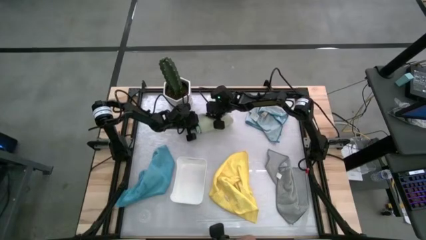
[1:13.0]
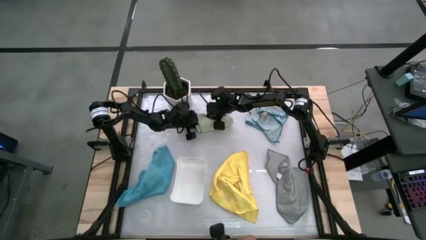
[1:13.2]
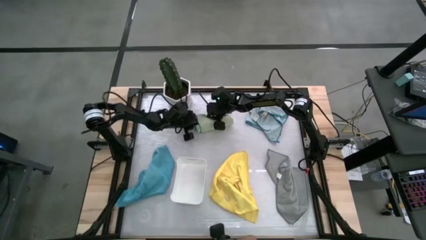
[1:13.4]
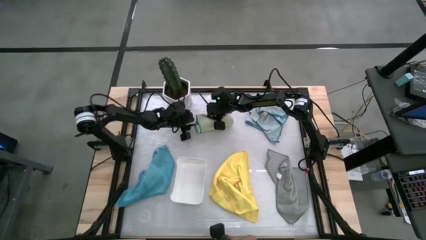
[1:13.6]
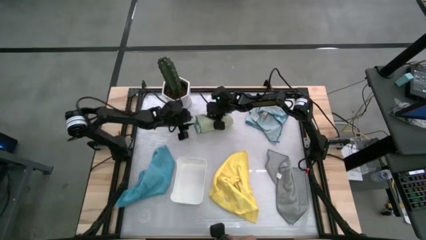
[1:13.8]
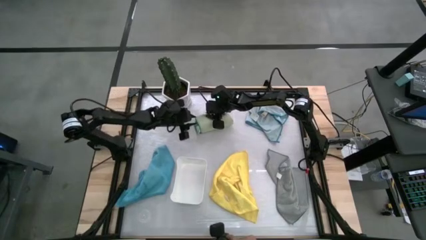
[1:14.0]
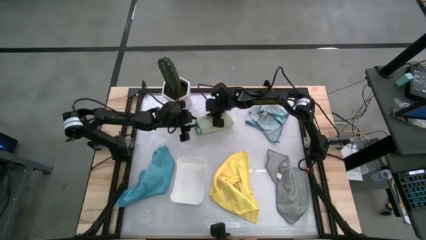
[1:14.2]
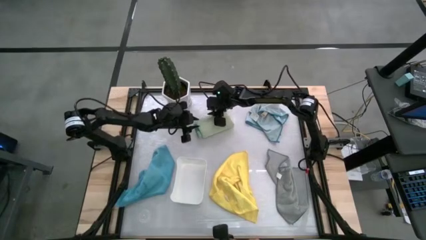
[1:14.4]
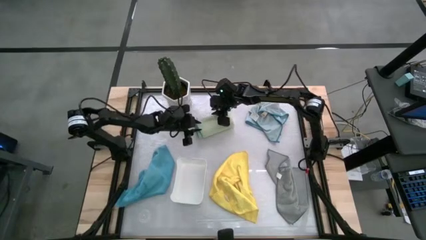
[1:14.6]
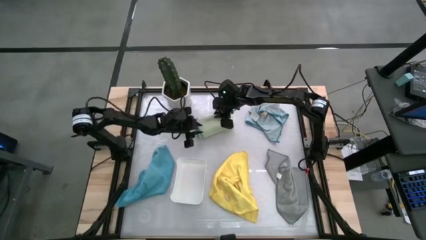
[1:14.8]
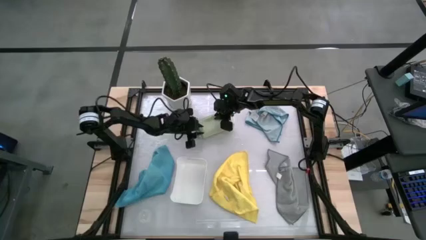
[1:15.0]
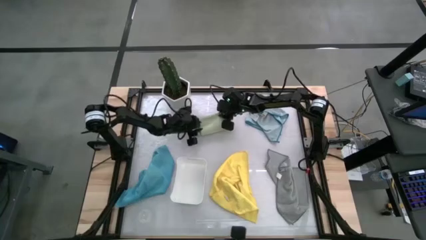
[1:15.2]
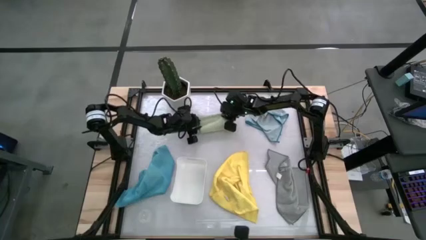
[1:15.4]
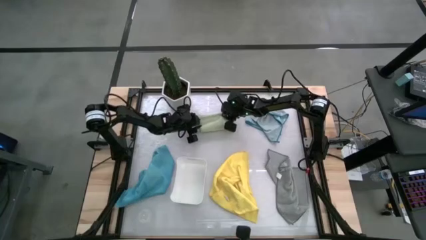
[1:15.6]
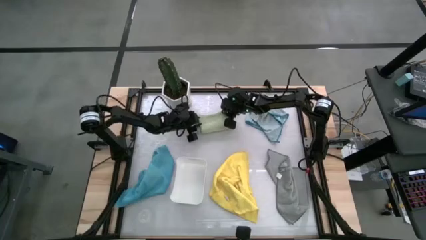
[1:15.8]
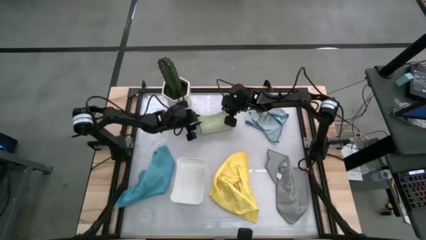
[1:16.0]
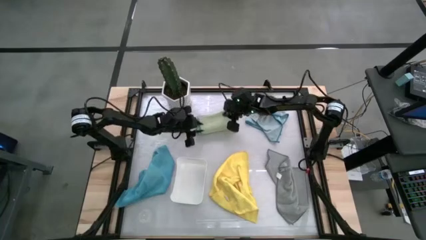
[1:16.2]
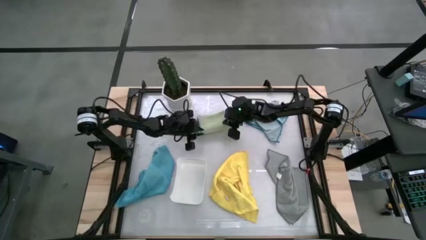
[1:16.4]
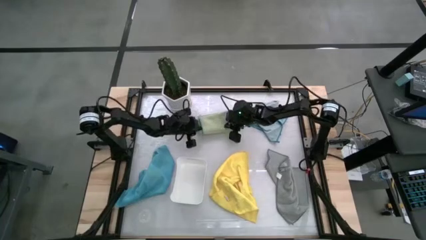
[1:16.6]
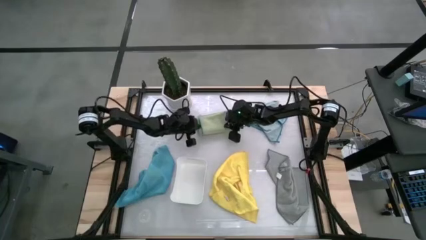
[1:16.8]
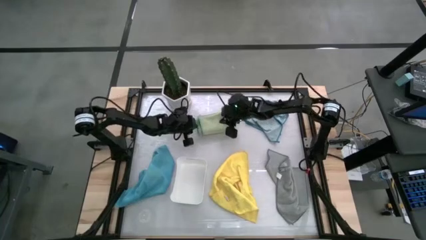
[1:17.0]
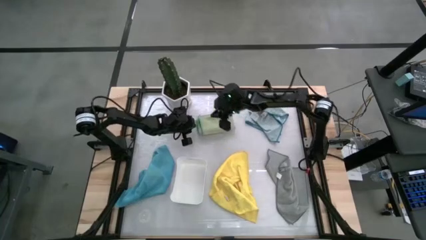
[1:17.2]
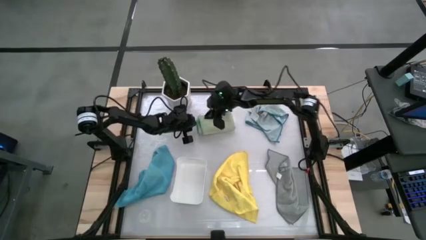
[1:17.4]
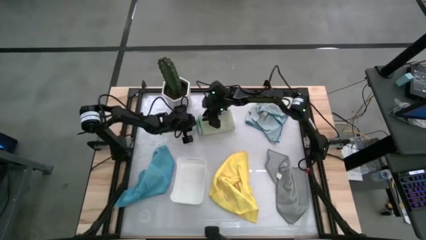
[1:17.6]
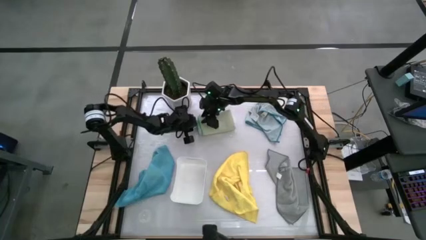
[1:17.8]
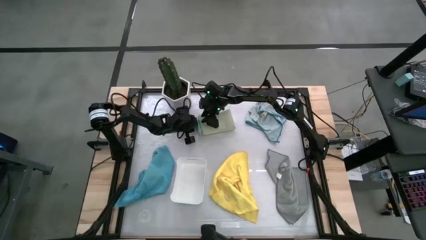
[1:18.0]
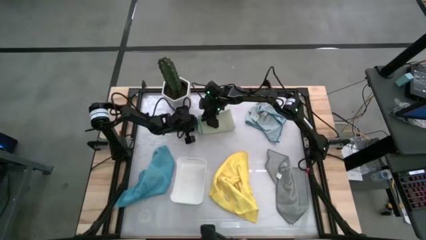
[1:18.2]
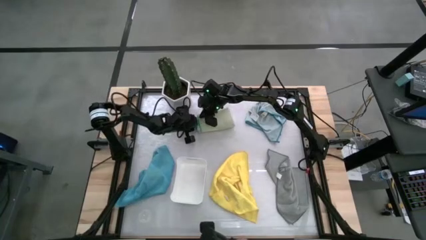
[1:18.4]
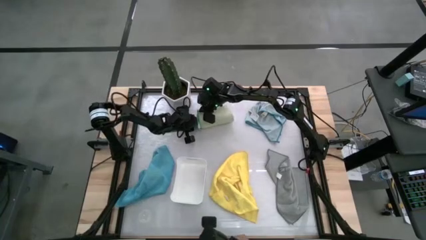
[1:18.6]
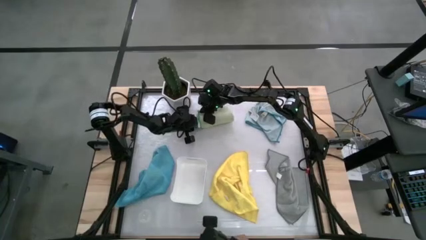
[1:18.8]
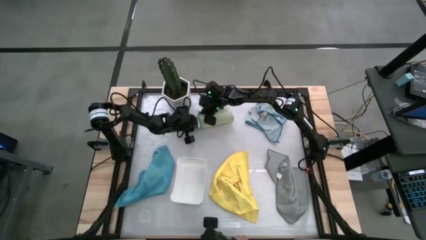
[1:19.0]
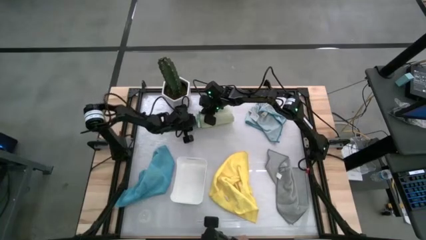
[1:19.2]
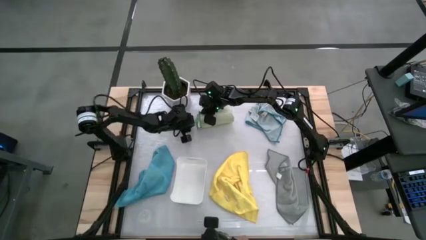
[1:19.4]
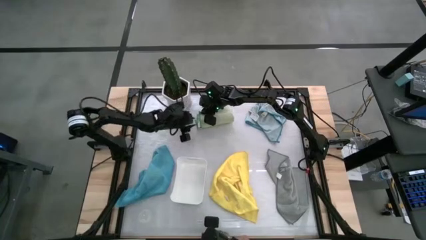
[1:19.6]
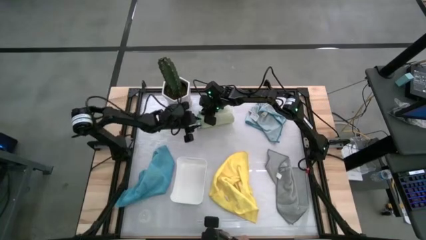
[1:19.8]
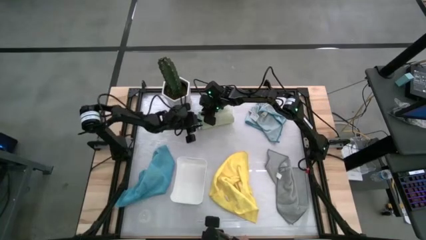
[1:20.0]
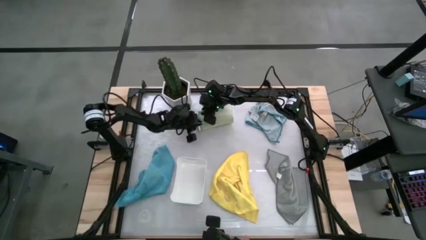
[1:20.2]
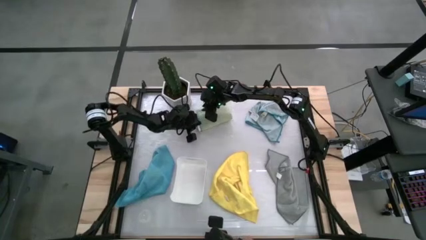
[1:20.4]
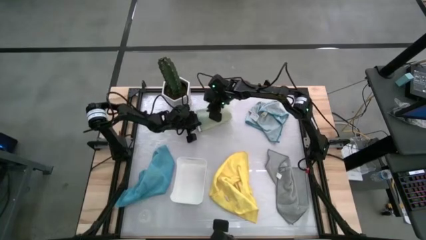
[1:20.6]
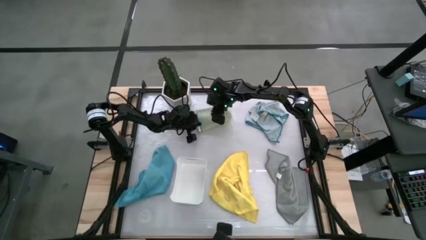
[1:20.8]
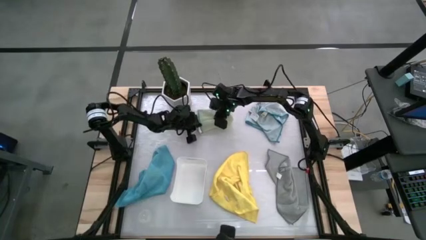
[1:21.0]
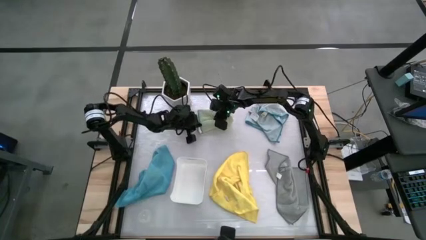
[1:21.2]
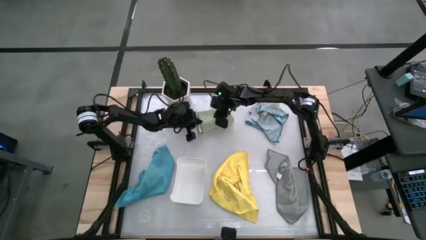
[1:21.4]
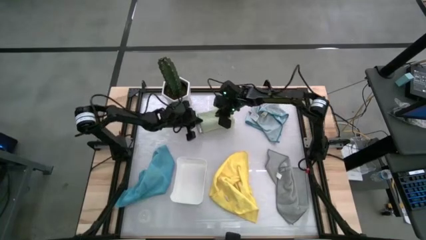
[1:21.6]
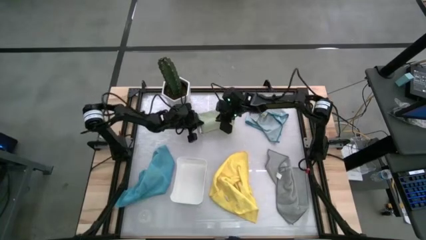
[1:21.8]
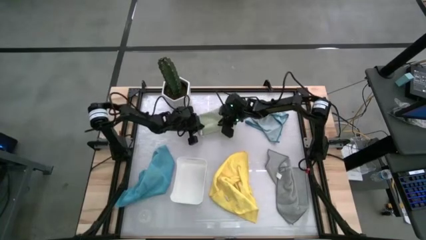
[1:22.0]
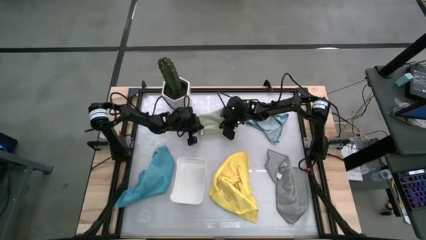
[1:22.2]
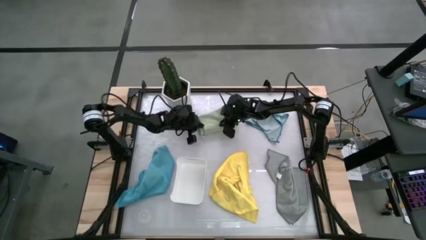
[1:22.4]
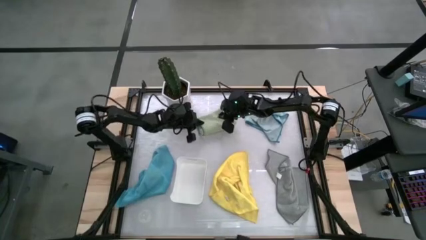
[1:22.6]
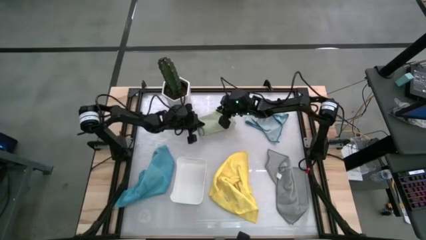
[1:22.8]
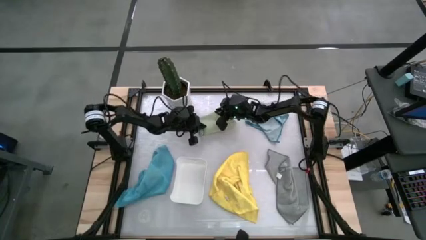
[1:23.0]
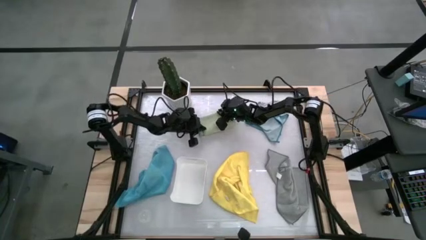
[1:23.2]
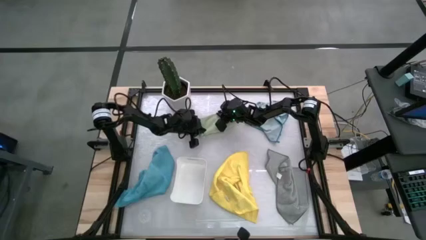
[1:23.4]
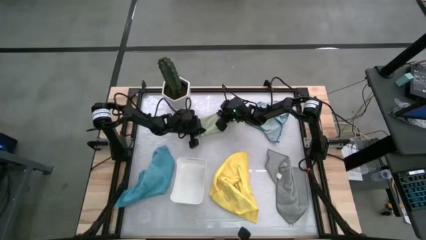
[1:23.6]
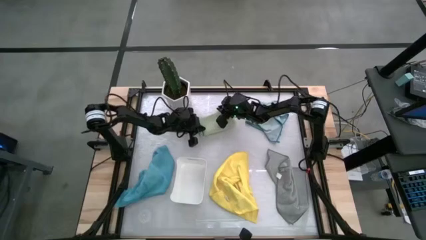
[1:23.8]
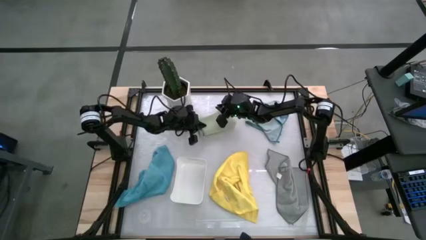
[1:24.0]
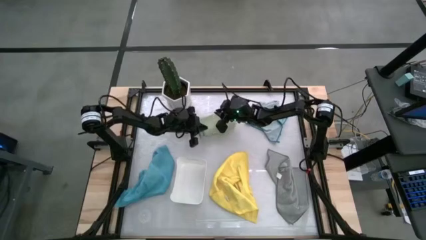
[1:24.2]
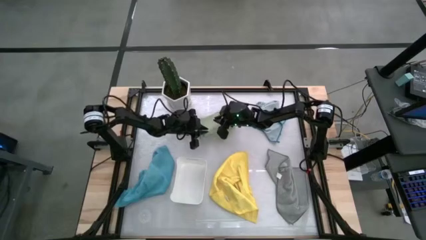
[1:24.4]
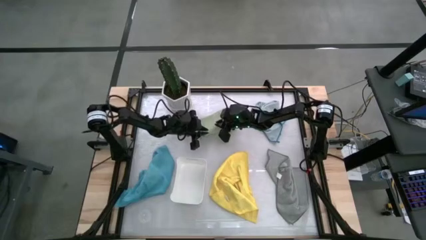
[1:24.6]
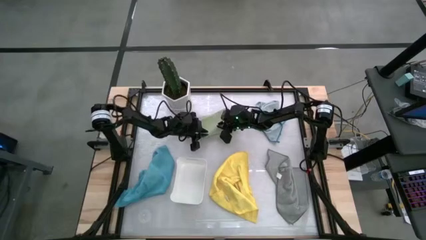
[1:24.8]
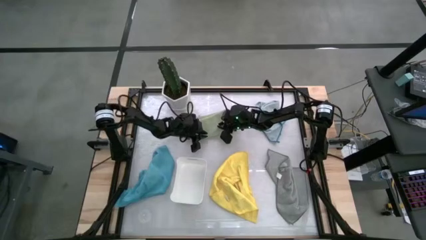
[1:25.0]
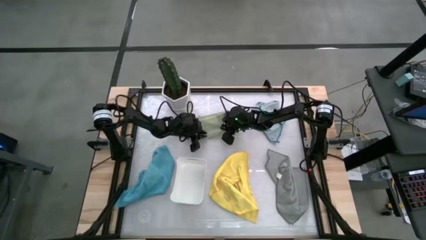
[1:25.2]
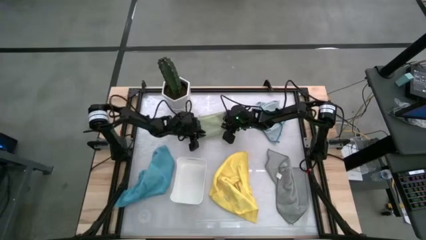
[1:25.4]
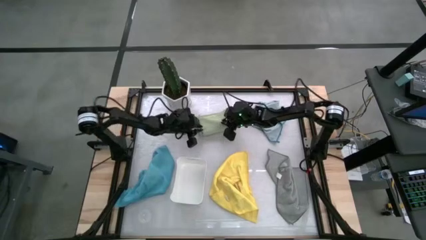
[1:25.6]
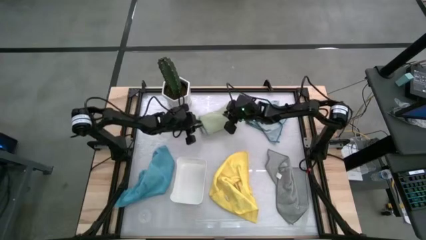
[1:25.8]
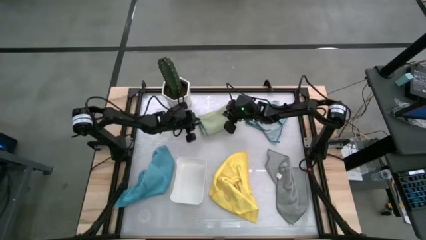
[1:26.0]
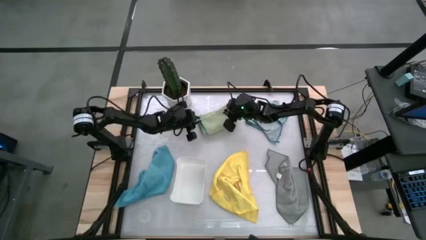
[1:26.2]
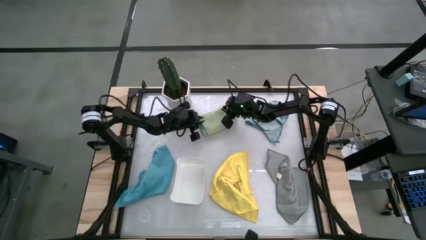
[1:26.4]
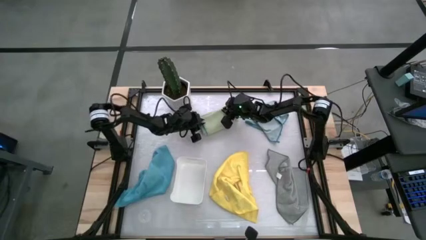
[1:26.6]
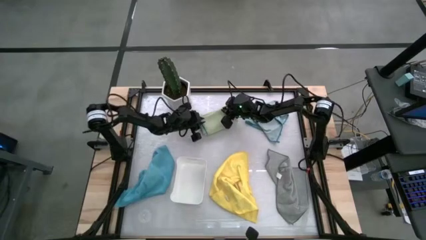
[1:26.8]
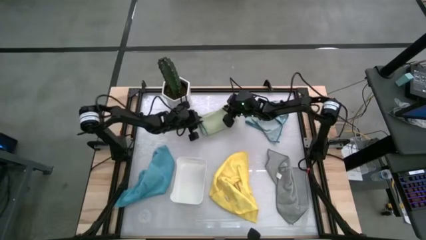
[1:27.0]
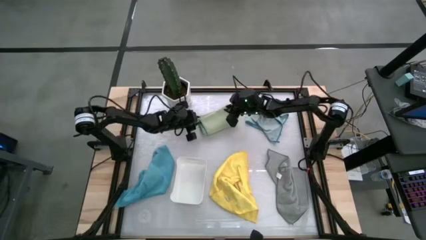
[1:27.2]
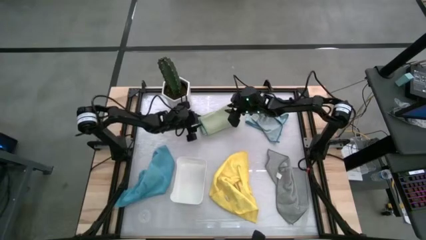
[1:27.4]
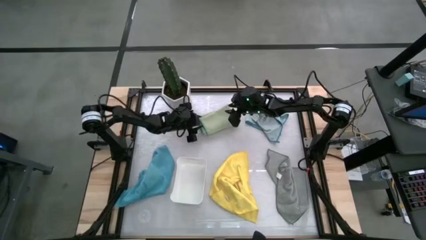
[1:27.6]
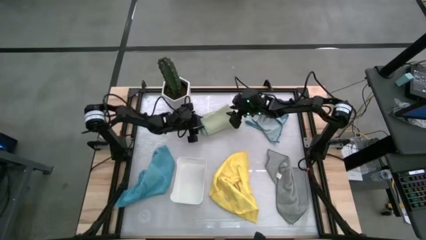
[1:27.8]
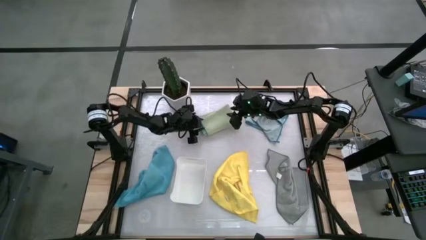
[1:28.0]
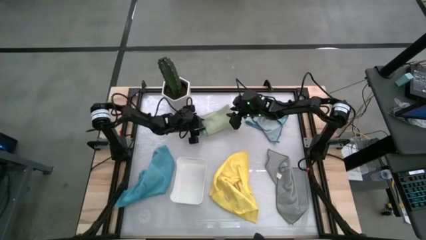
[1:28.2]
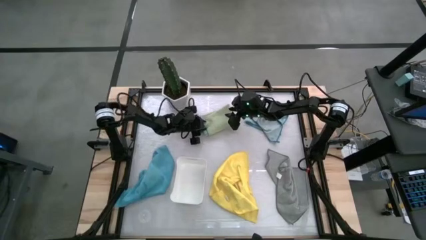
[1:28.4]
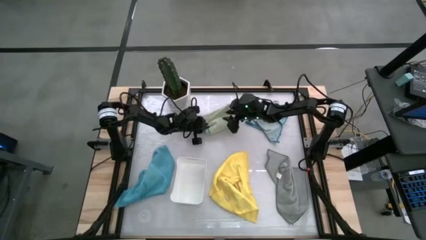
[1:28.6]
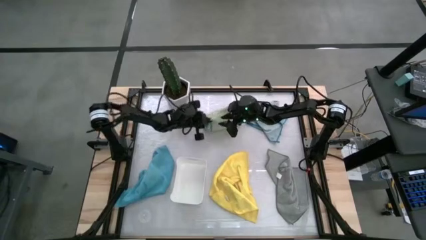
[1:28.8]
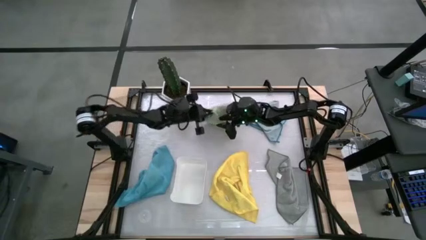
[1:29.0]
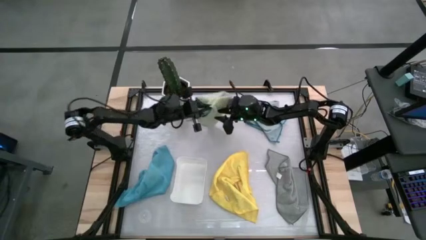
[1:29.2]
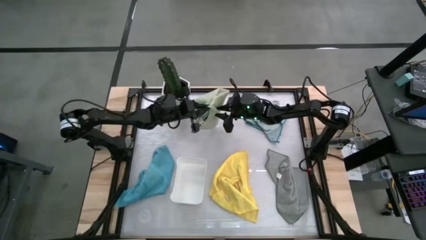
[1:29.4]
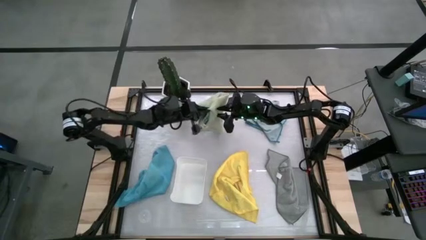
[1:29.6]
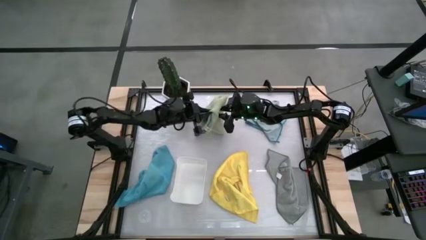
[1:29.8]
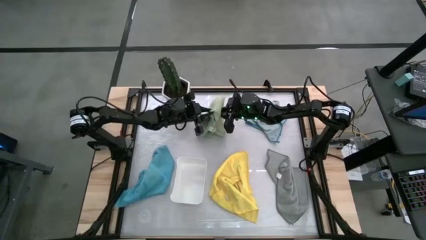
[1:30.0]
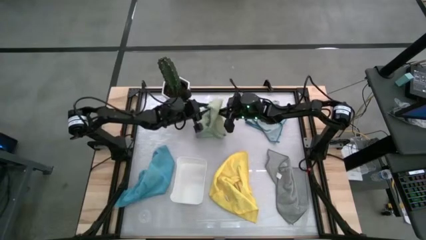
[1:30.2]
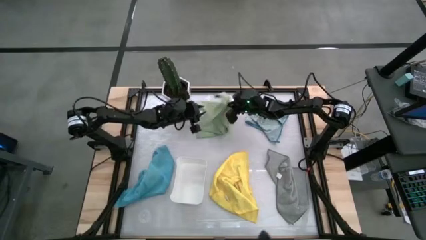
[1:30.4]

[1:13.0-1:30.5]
Task: Fold microfiber towels
Fold the green microfiber towel
